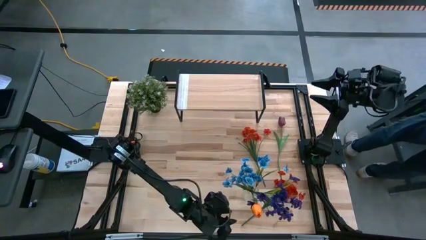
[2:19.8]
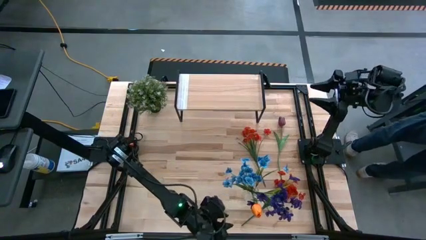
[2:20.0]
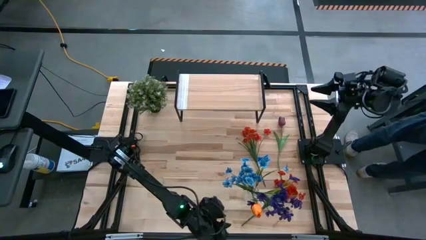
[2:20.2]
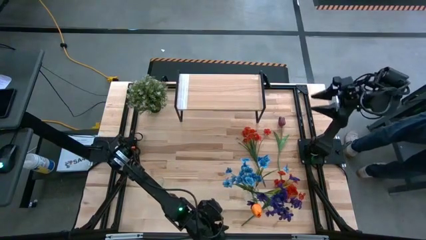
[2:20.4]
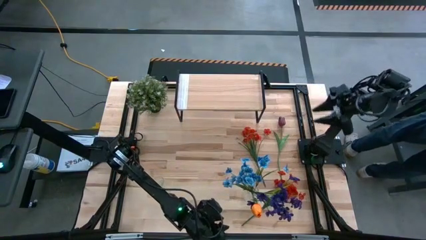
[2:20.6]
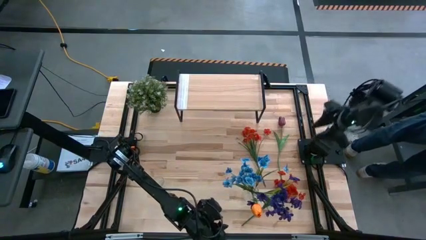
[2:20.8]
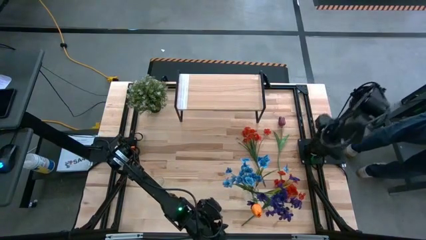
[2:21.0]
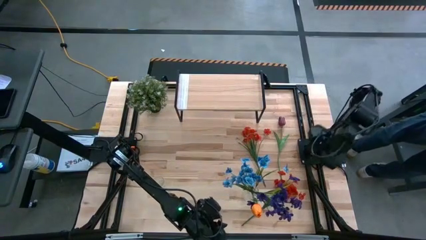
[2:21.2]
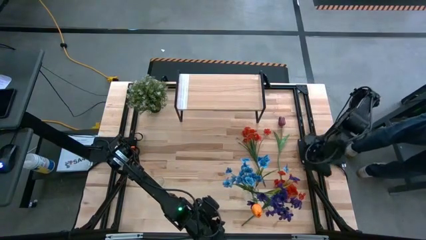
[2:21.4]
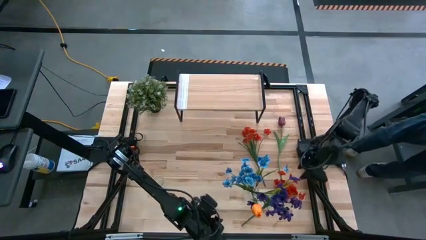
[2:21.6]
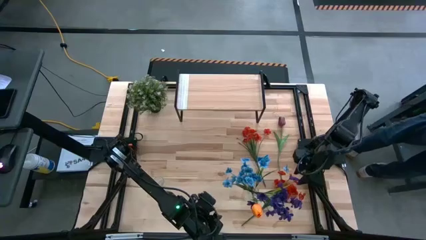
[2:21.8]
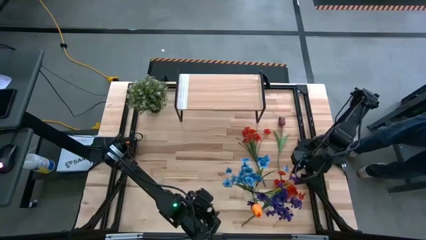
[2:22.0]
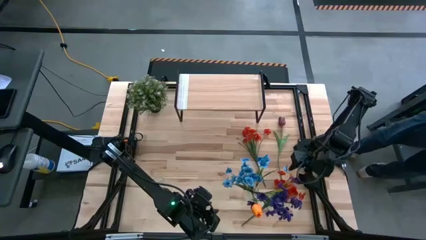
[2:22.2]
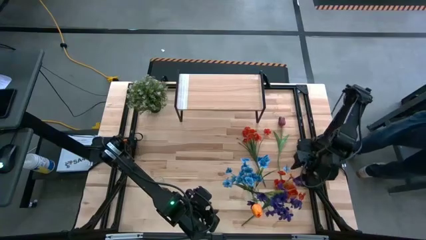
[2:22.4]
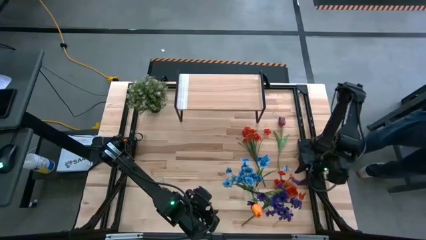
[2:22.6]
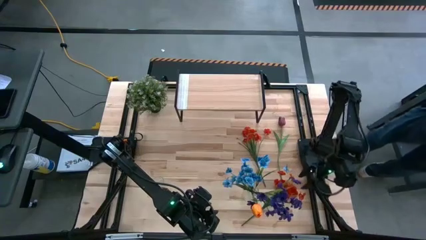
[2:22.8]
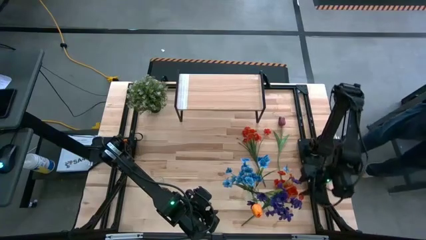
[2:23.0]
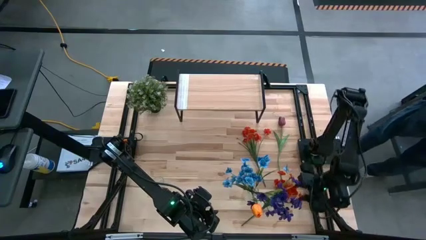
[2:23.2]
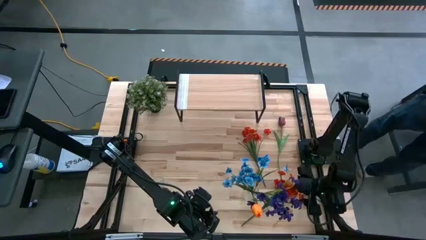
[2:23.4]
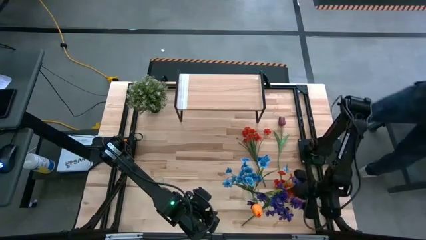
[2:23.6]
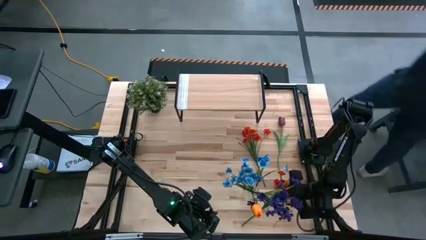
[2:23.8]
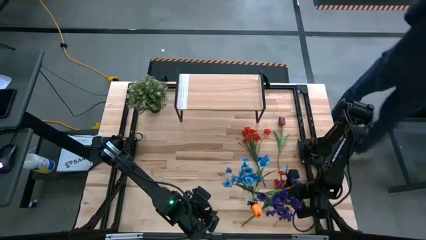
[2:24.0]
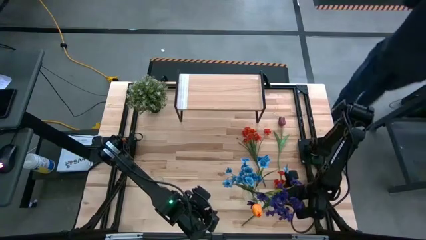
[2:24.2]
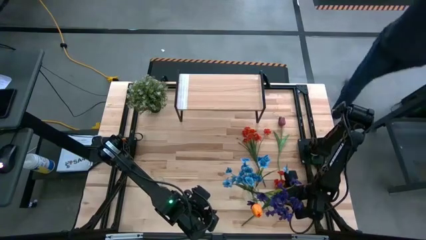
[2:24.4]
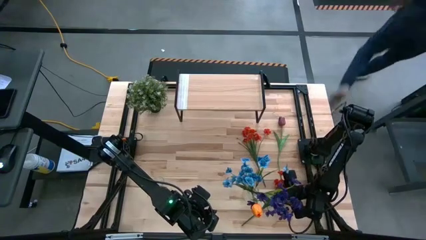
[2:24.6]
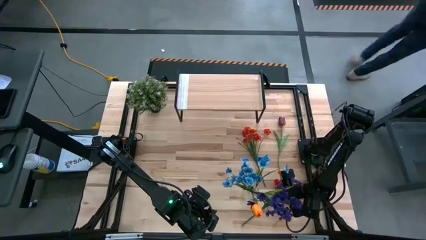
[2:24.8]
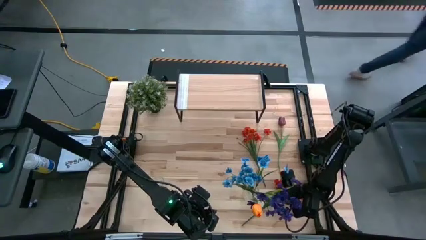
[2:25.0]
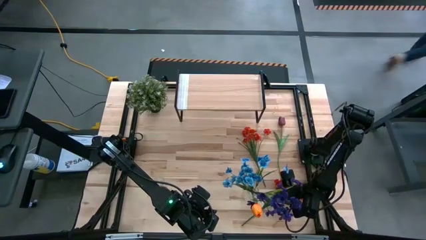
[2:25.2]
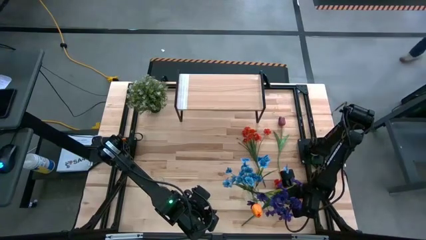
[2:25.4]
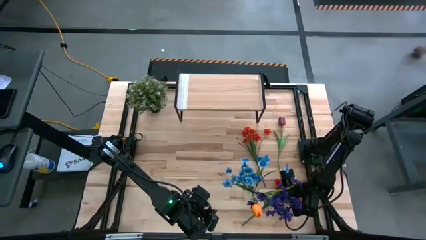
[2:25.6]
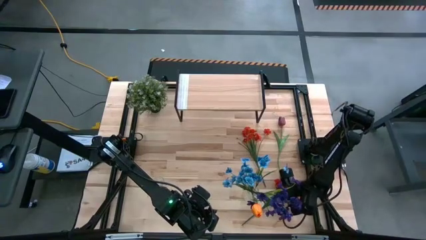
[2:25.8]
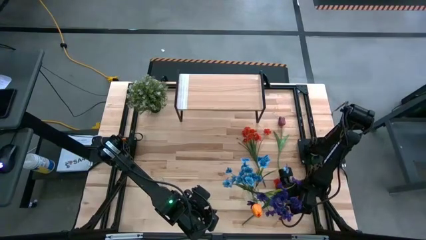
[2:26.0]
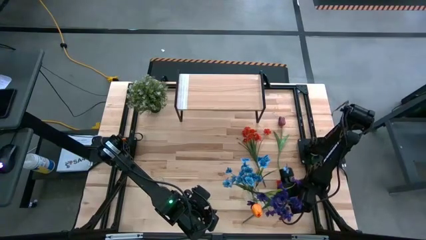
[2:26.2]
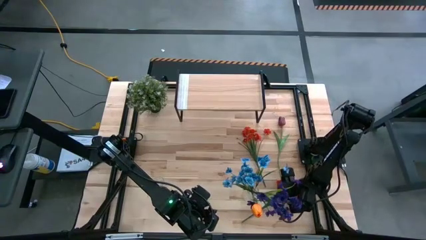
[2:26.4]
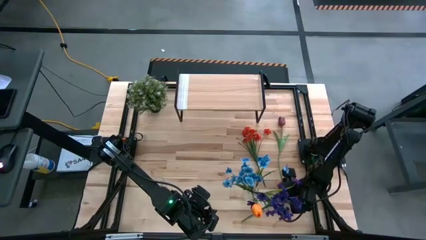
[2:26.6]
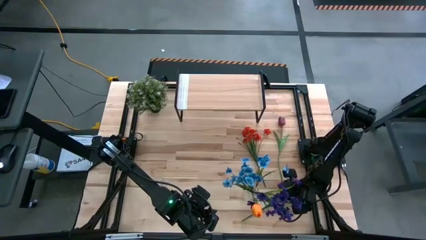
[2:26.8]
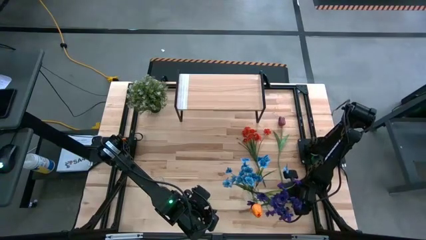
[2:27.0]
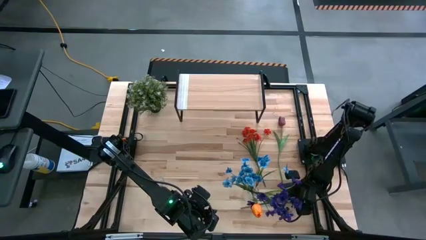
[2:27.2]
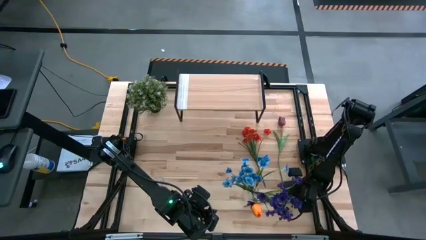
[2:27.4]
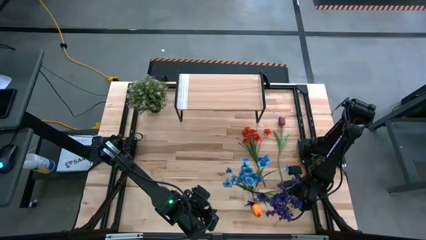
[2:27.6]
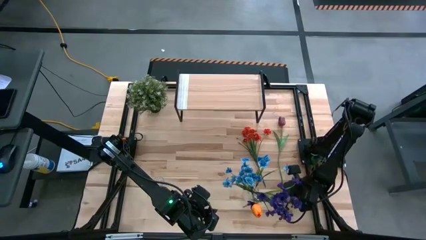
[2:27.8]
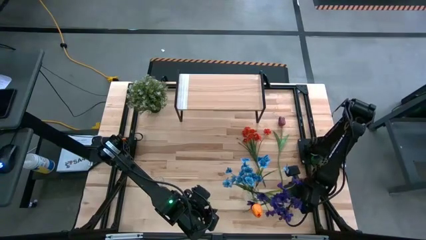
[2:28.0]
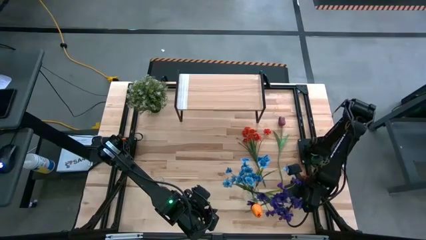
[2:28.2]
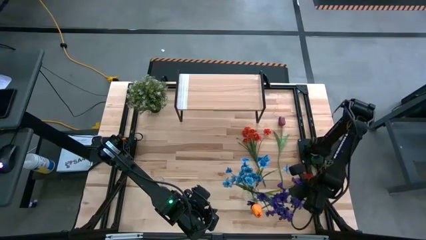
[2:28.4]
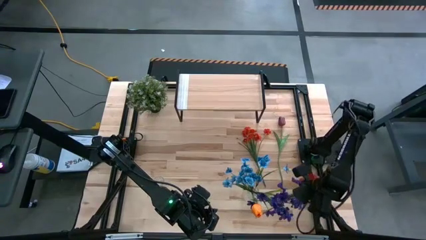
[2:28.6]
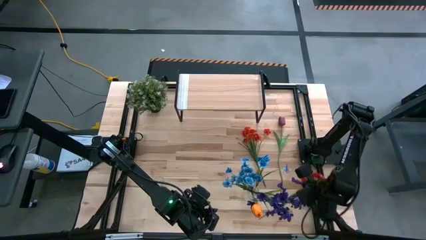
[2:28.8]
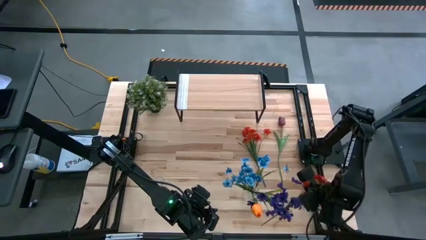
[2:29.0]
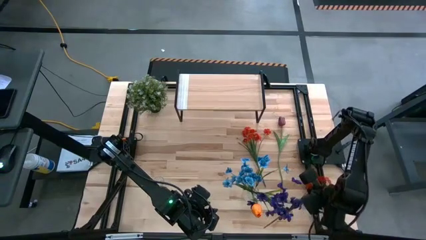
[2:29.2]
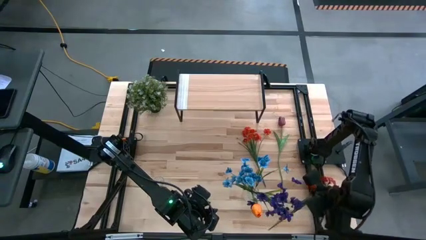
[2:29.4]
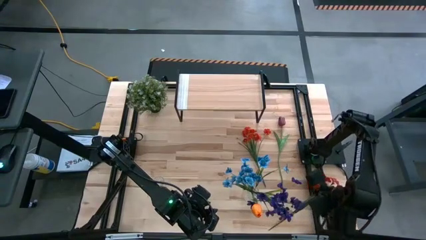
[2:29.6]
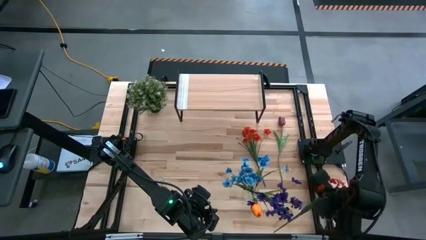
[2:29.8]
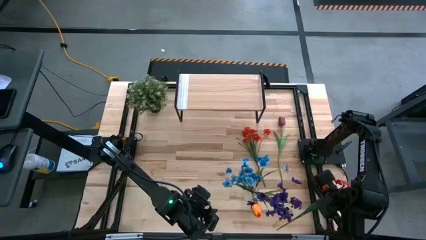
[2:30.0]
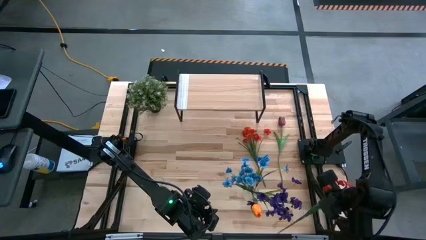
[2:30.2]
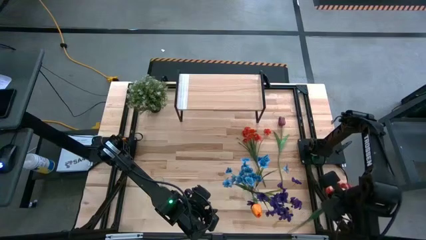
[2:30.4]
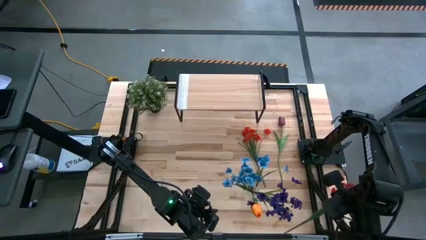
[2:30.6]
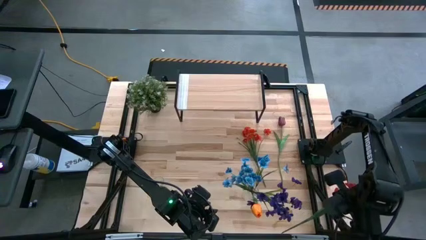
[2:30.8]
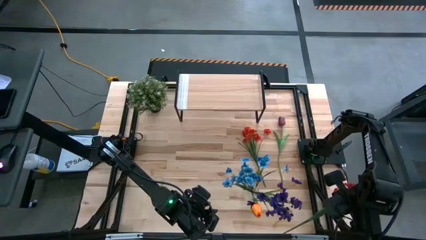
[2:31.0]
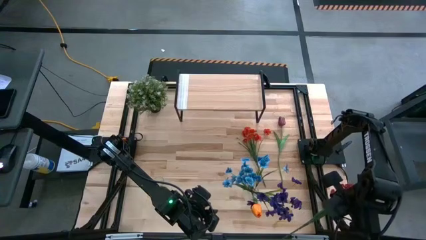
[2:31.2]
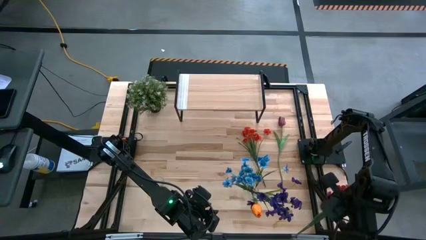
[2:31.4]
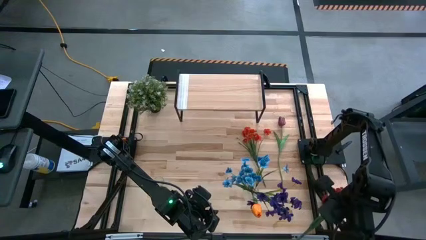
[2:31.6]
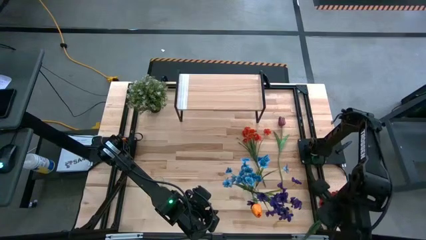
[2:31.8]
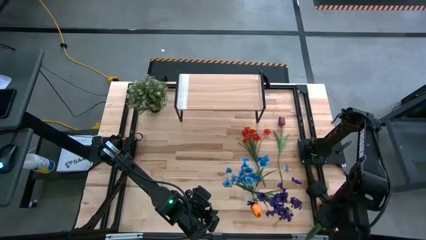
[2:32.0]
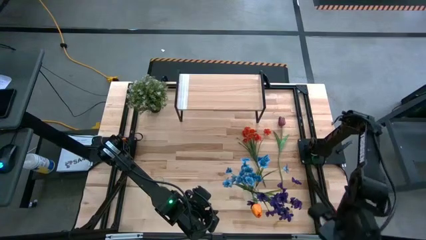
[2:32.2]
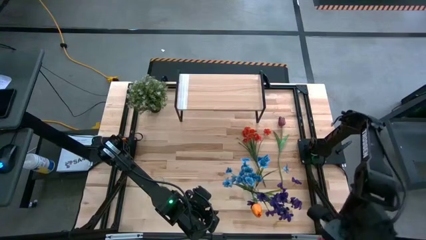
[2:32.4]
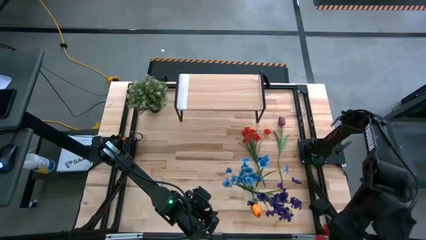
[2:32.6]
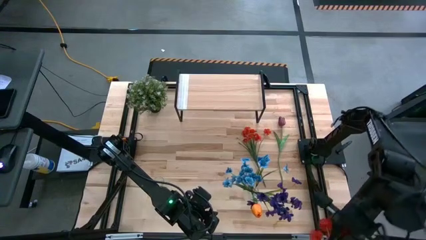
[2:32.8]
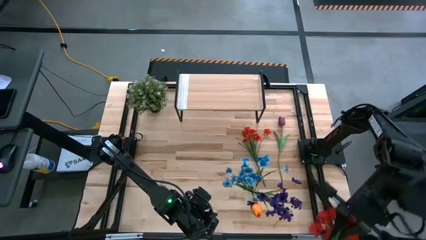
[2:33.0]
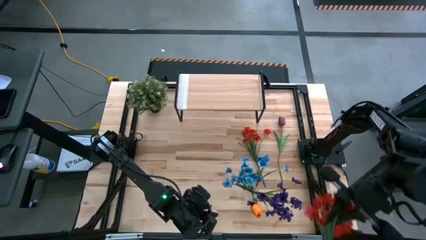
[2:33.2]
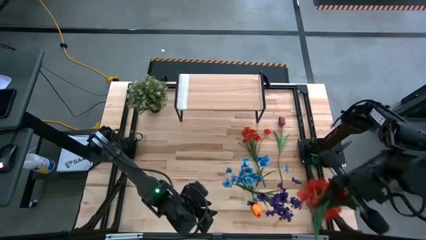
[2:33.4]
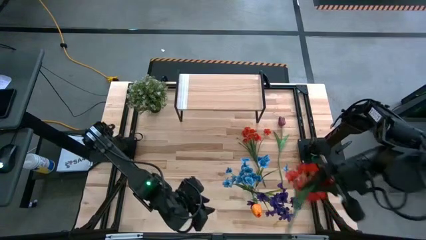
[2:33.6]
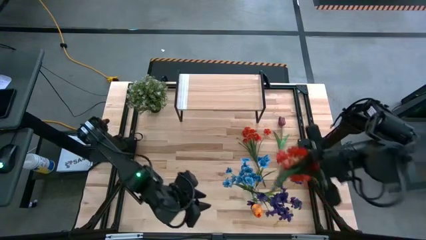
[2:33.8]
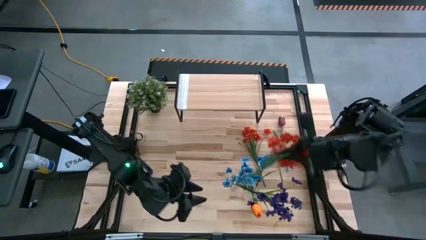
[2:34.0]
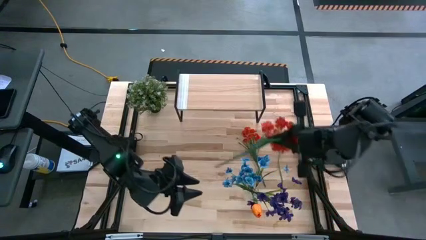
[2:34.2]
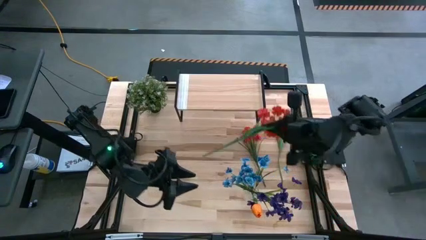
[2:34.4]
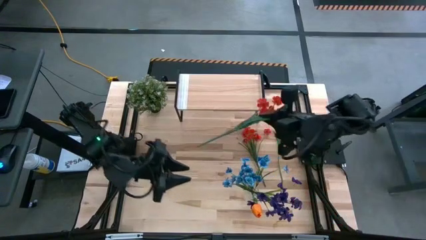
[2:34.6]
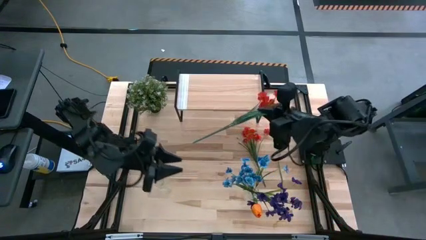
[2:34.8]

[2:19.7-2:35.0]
Task: Pick and place flowers into a vace then onto a shelf
Put the bottom orange flowers into the left transparent vase
